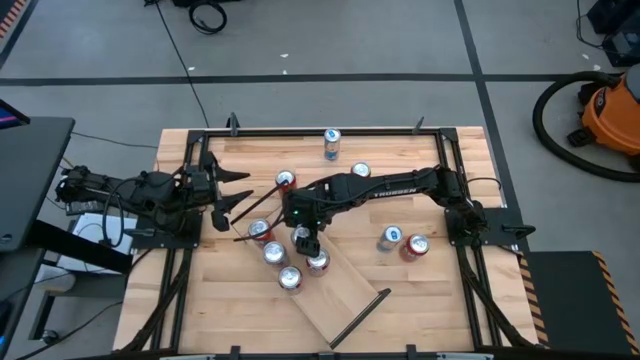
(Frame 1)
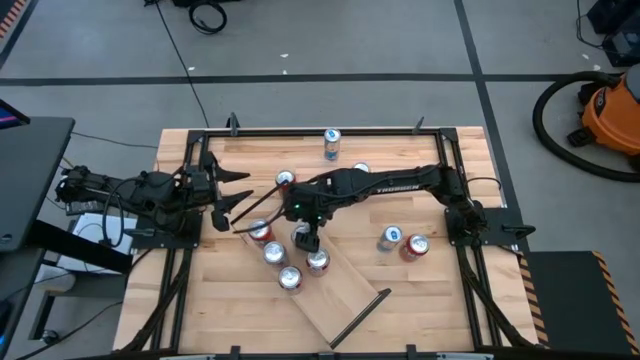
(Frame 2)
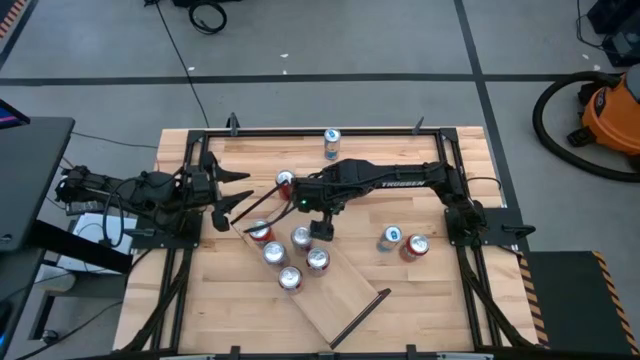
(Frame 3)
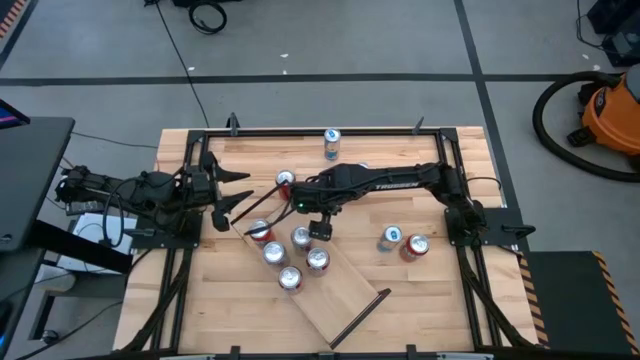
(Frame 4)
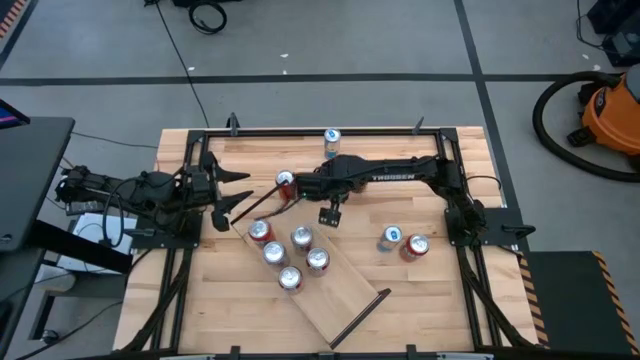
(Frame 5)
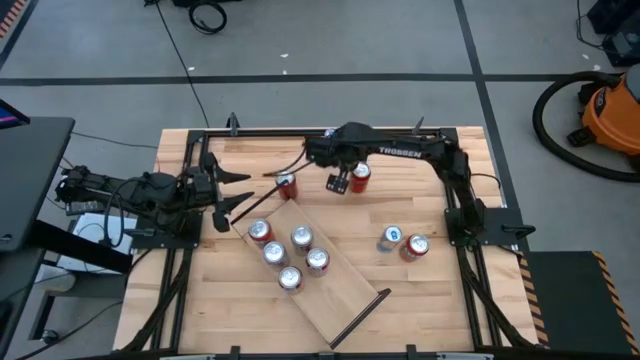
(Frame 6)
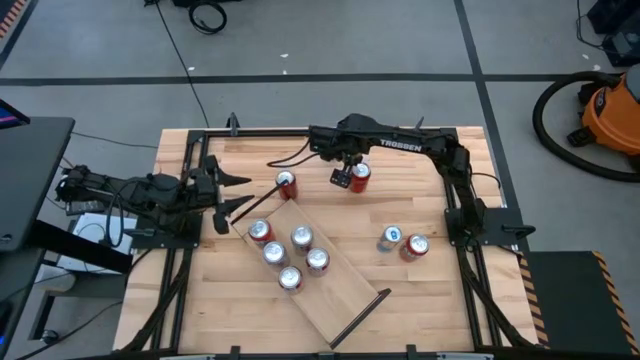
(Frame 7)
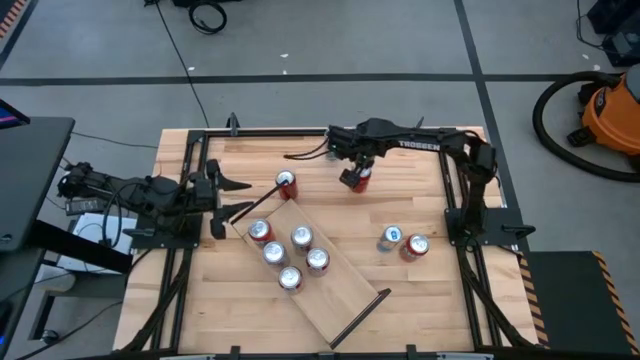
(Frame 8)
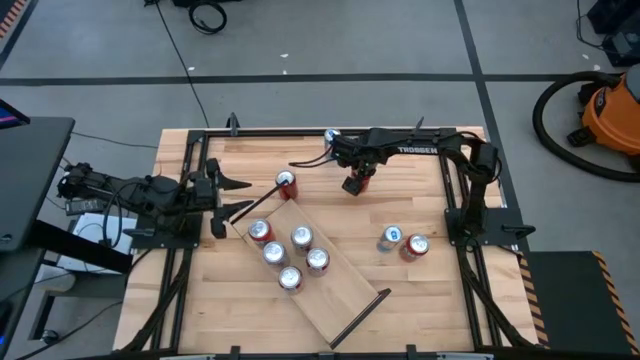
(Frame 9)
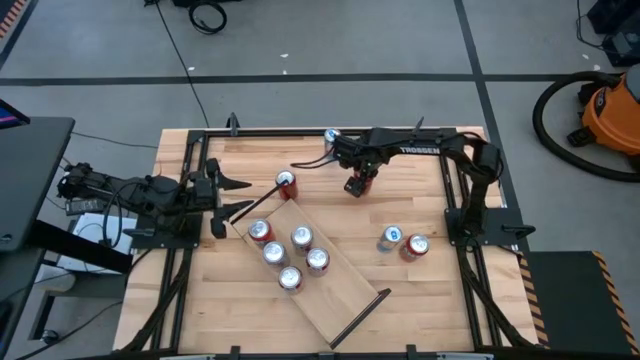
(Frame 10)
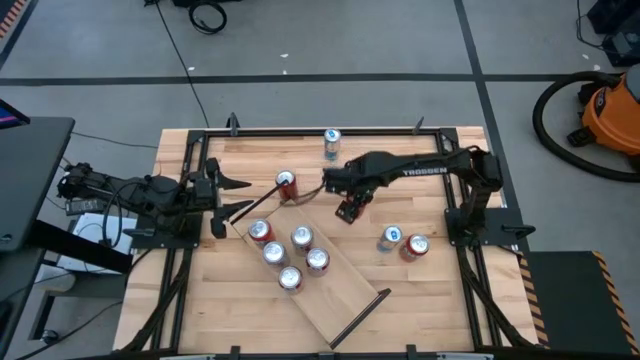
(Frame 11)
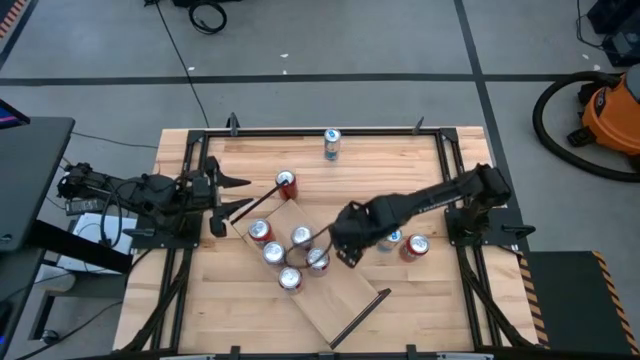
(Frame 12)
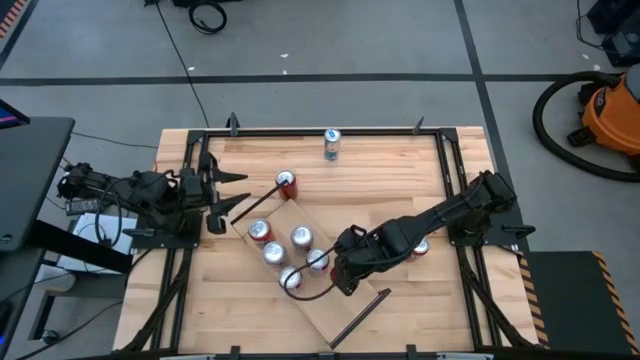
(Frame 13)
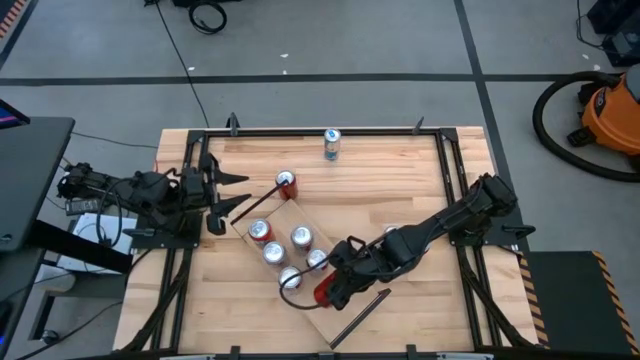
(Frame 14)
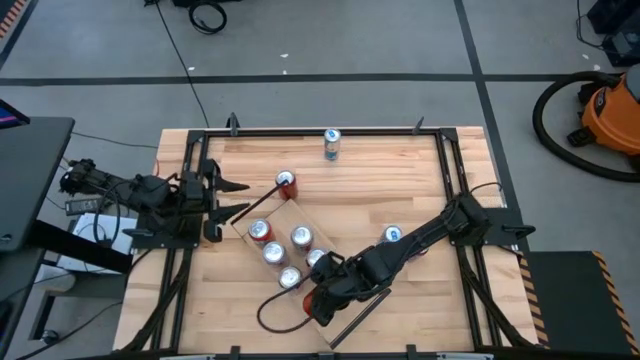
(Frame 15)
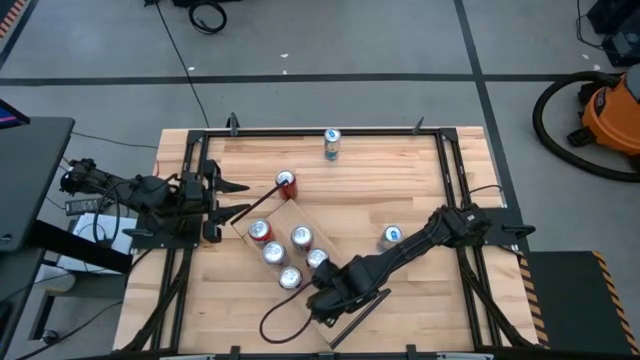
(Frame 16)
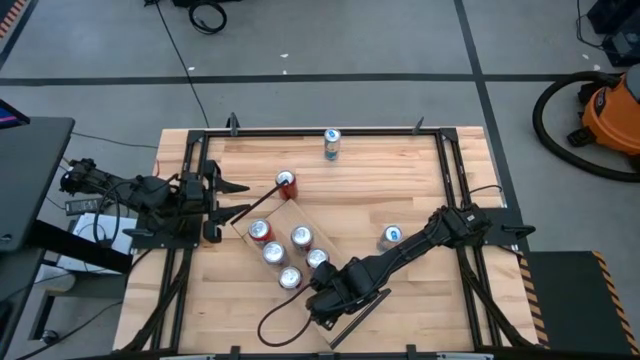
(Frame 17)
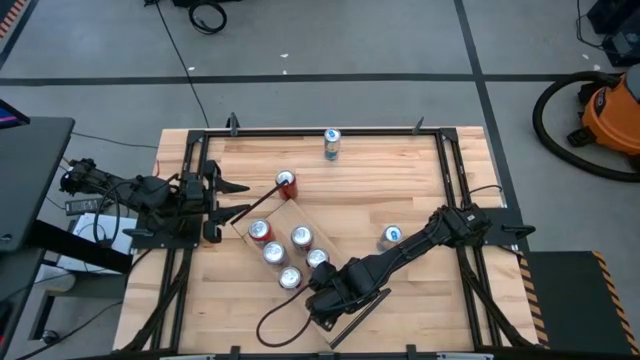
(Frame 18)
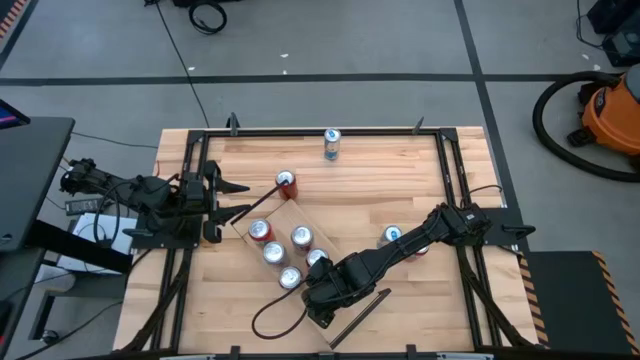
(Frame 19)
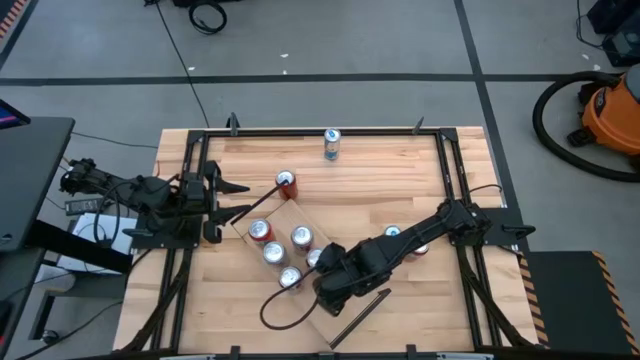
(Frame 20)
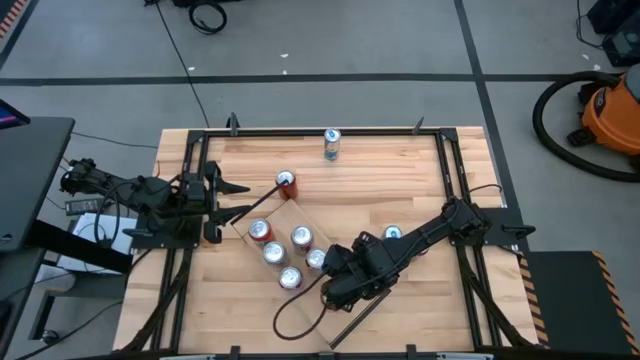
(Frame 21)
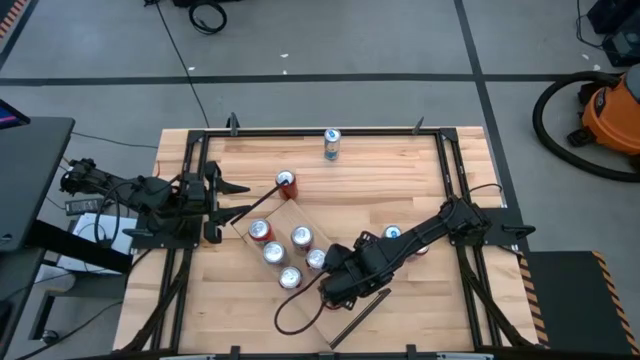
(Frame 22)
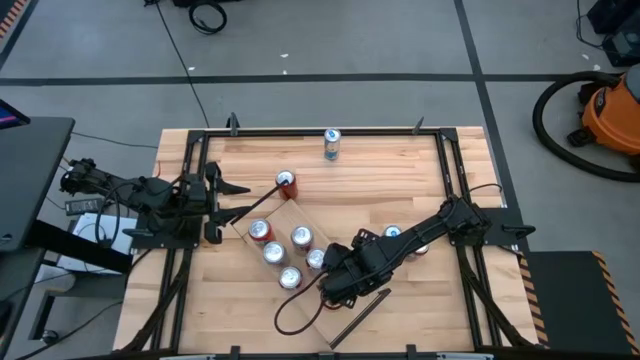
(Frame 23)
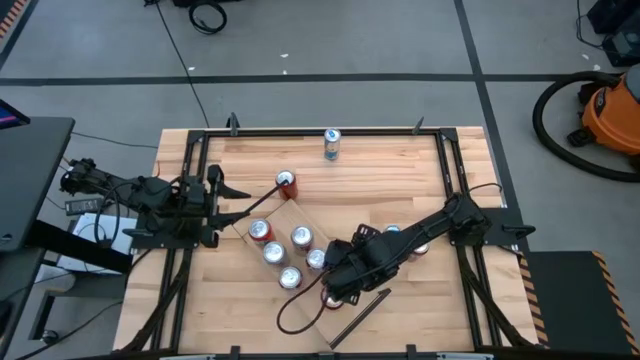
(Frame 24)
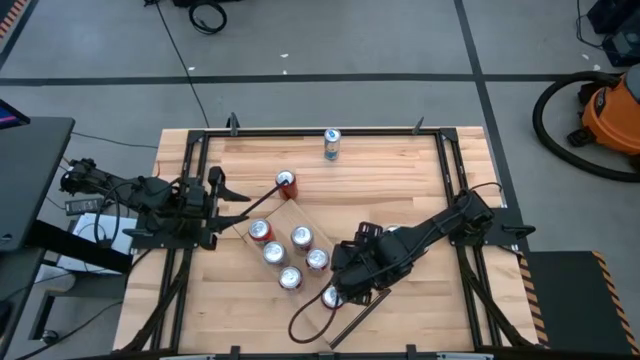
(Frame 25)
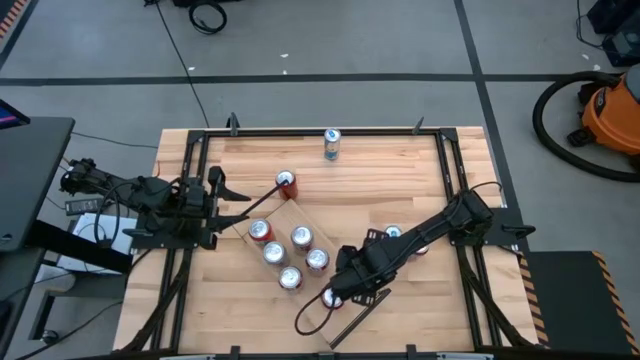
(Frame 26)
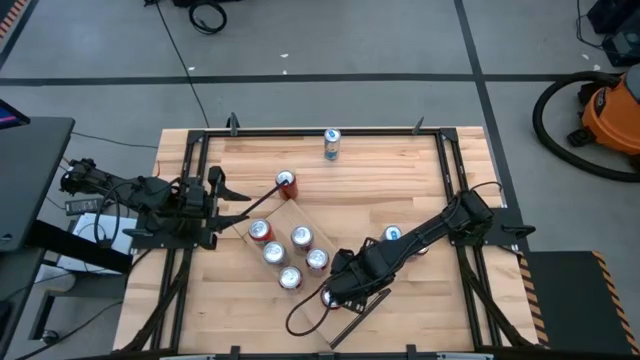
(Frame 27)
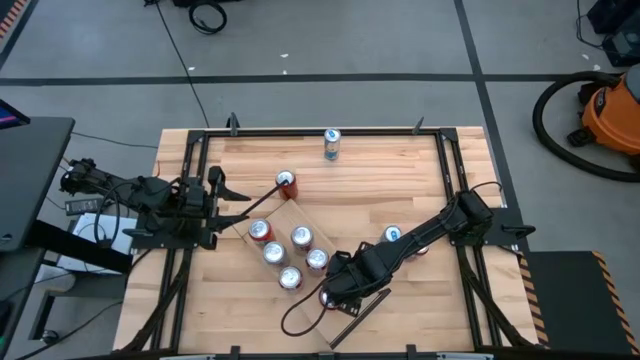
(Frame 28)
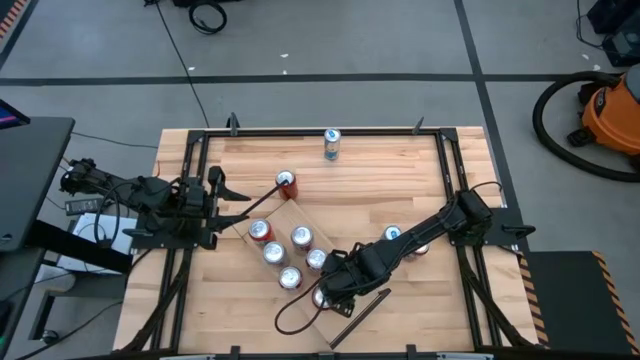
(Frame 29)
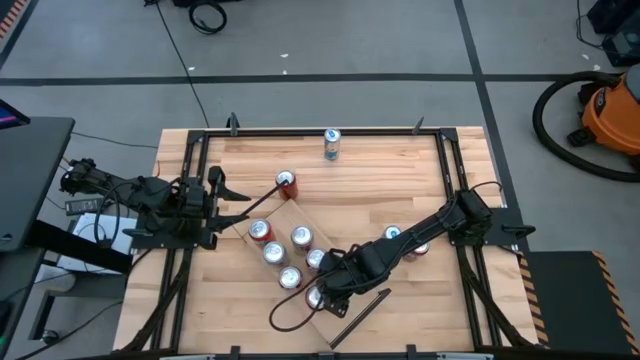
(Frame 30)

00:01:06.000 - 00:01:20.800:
Task: Place canned beverage on shelf
Put the right red and black soda can on the shelf

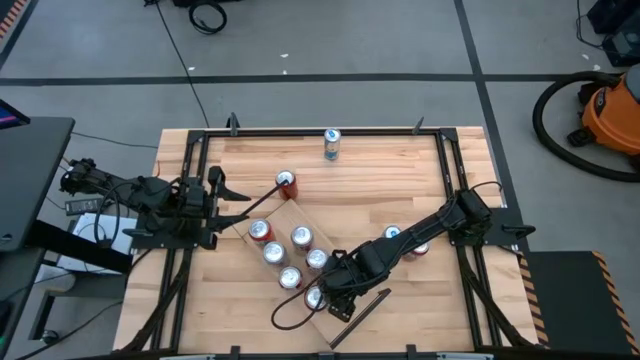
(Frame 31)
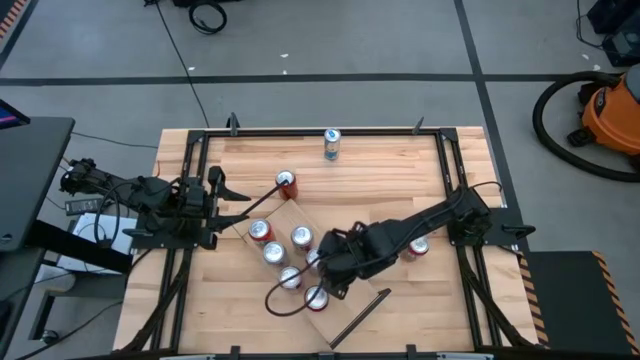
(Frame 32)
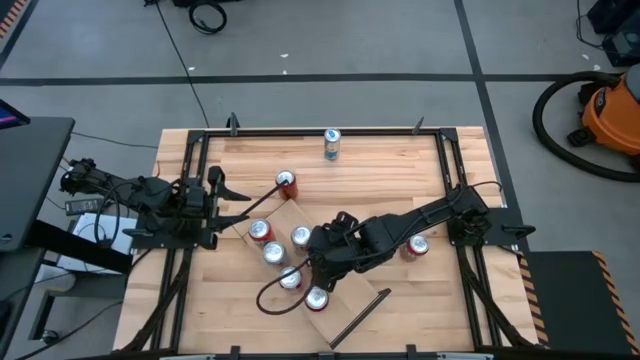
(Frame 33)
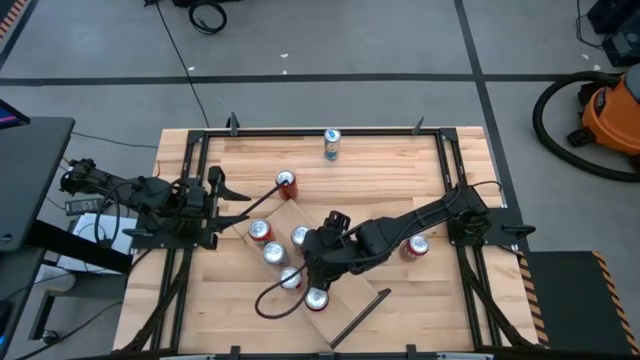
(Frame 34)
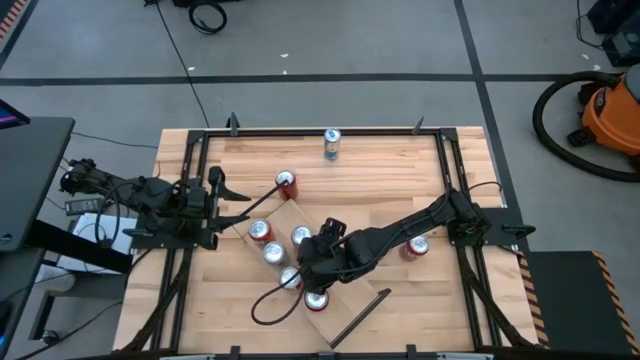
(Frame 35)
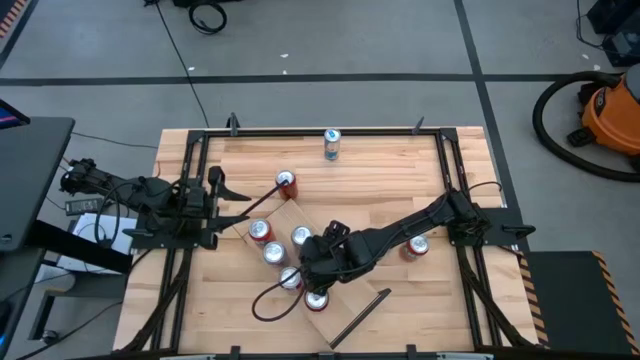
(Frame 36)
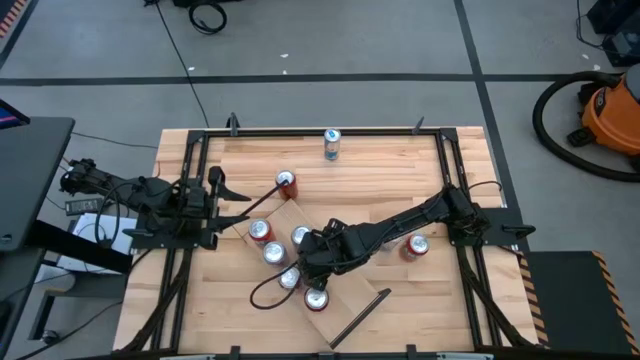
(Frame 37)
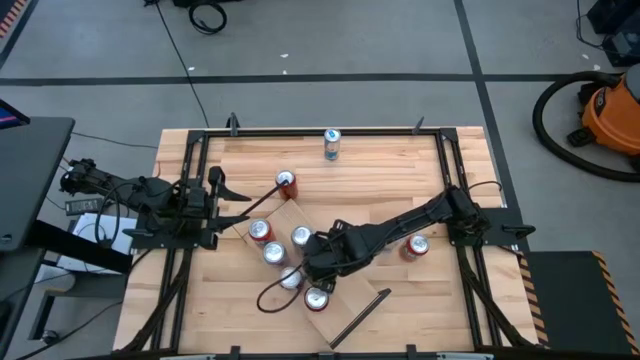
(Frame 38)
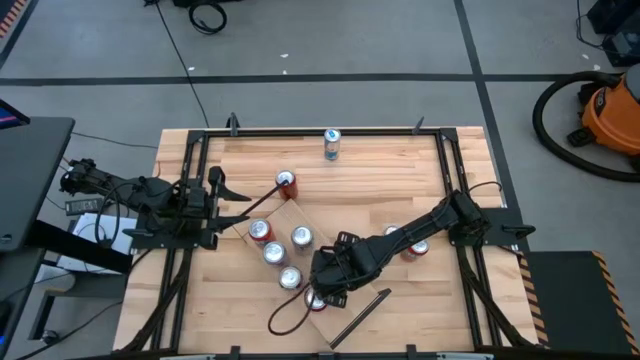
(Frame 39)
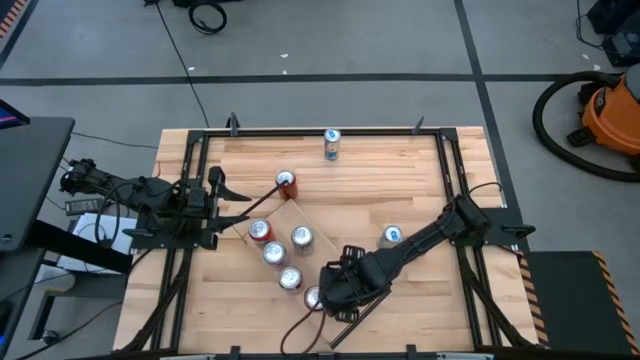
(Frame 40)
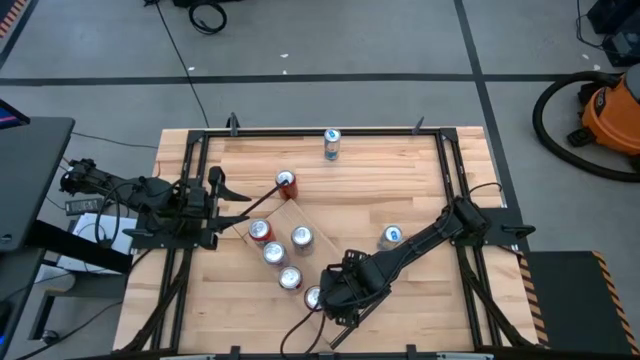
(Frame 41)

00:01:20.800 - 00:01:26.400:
Move the red soda can to the bottom right of the shelf
